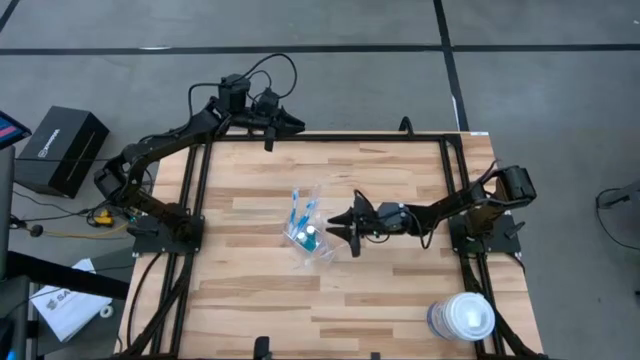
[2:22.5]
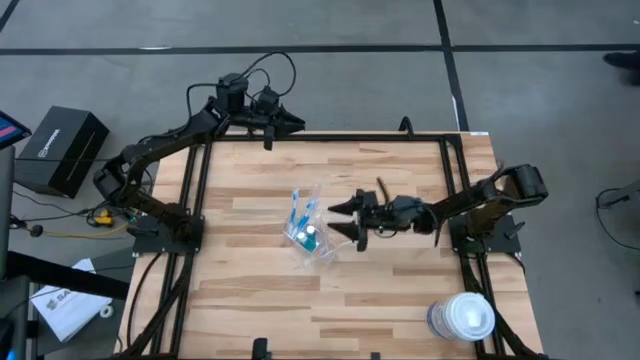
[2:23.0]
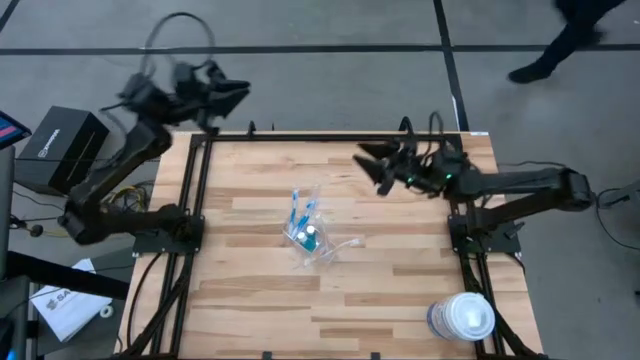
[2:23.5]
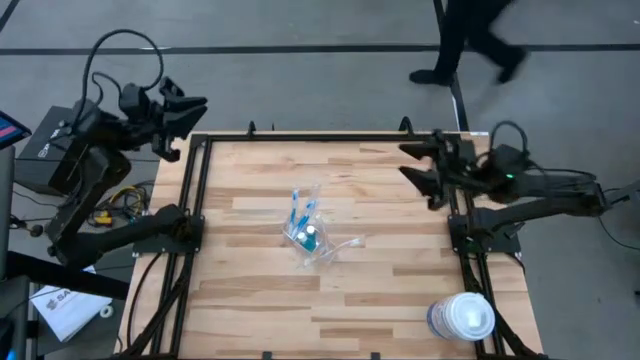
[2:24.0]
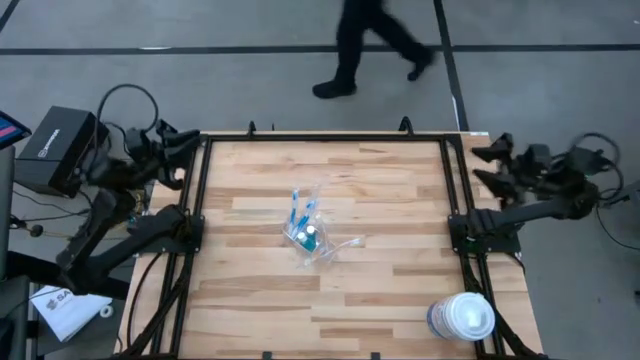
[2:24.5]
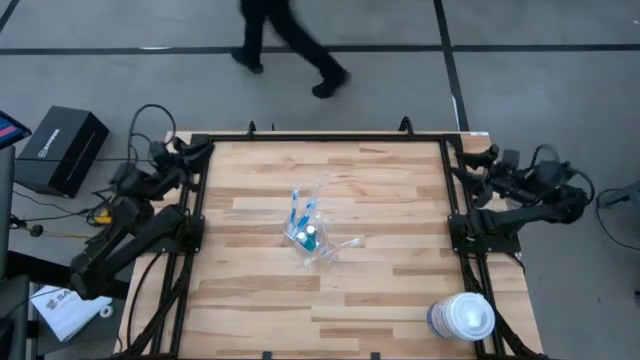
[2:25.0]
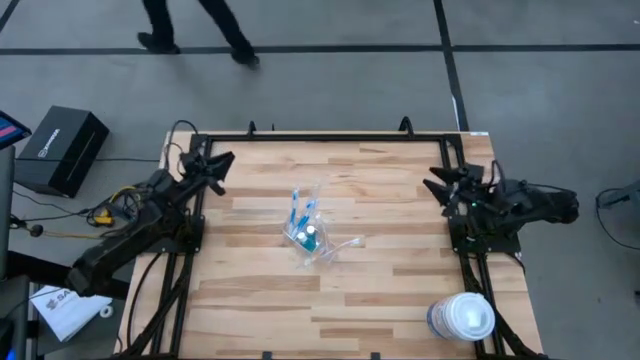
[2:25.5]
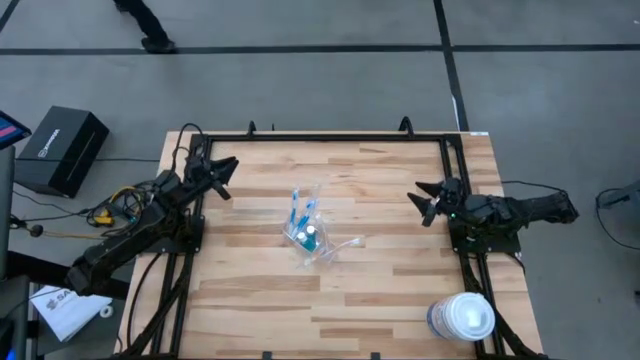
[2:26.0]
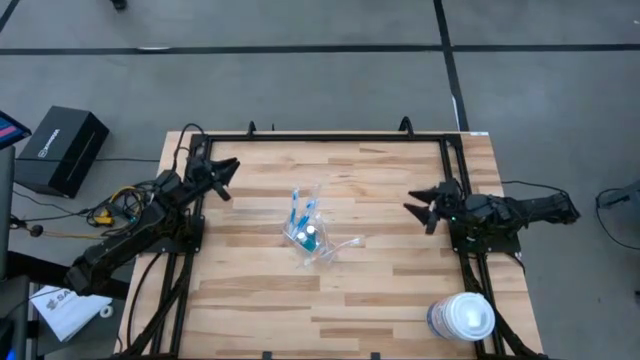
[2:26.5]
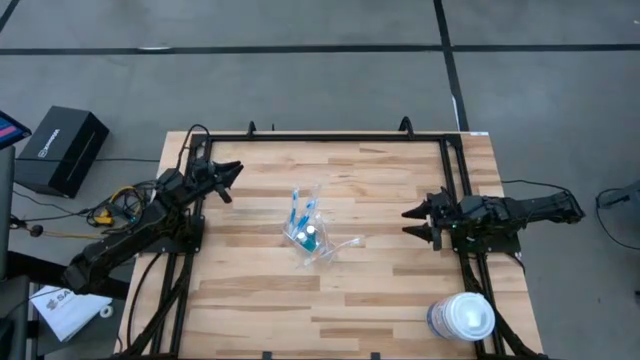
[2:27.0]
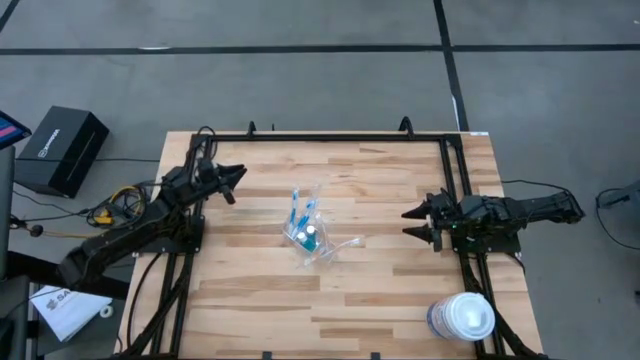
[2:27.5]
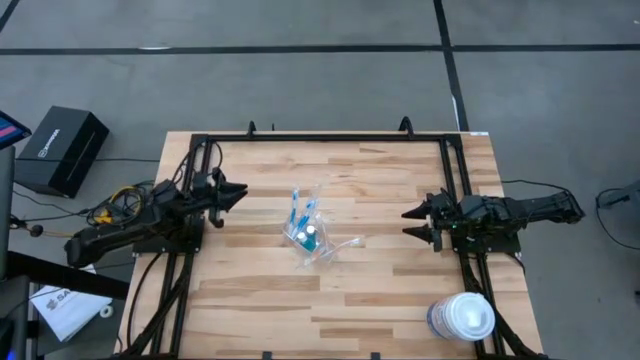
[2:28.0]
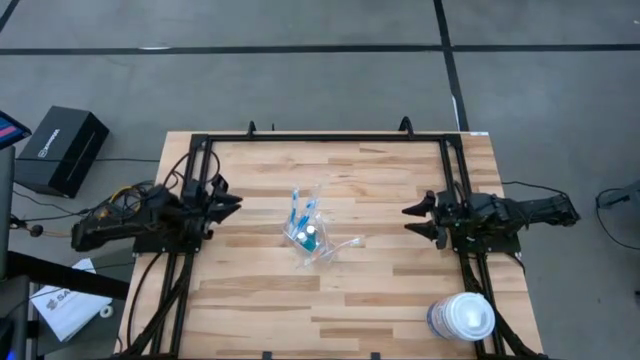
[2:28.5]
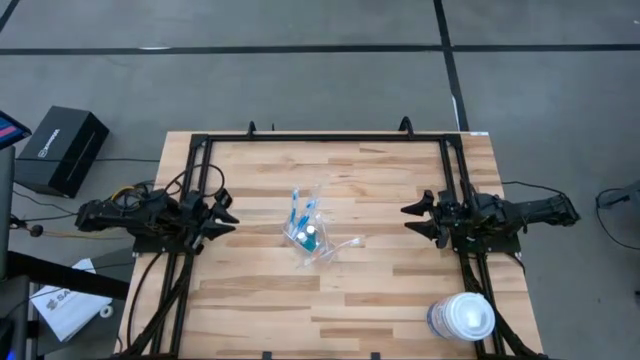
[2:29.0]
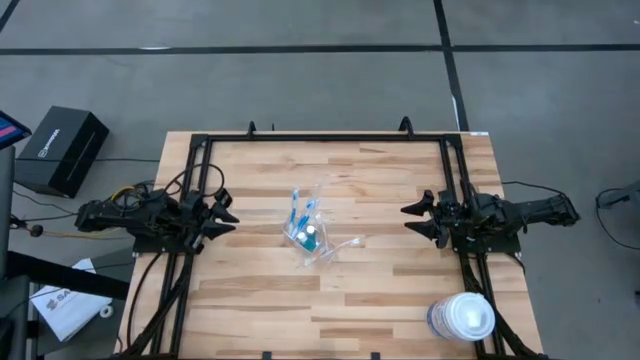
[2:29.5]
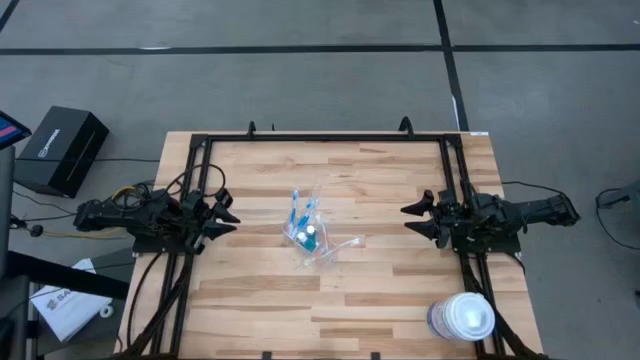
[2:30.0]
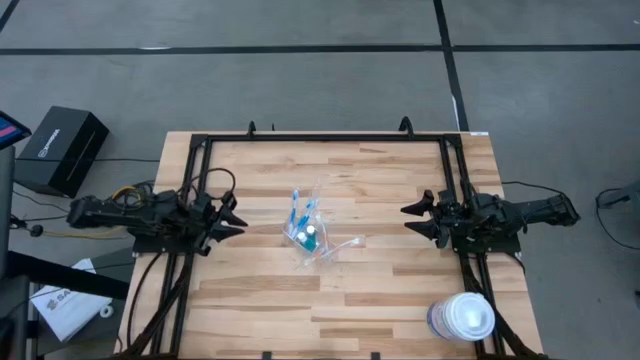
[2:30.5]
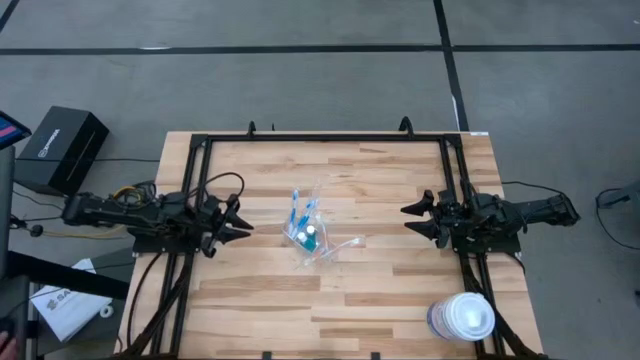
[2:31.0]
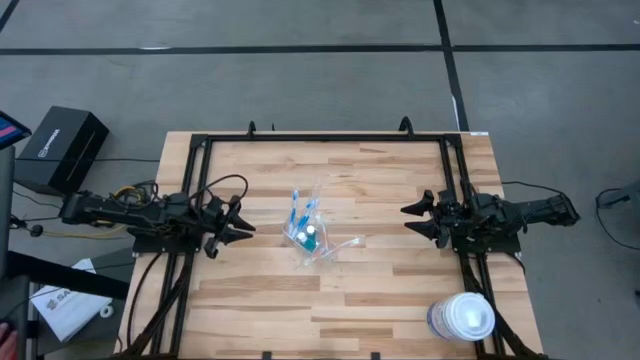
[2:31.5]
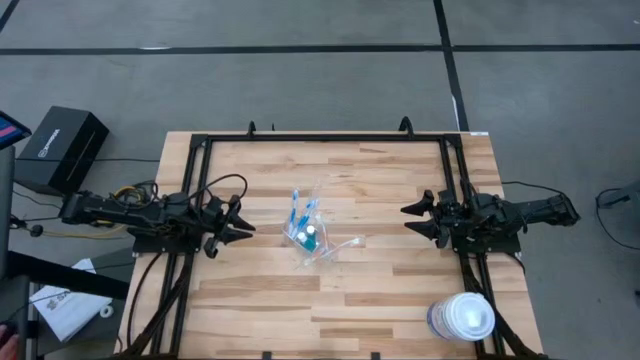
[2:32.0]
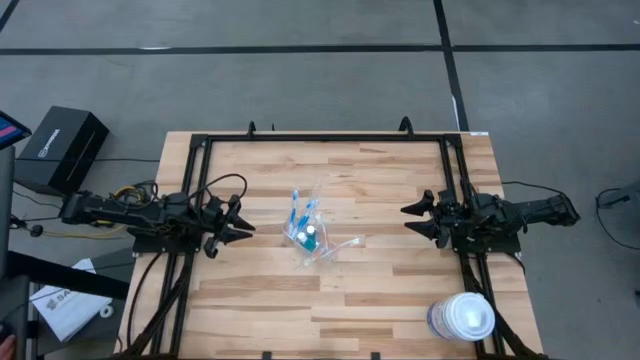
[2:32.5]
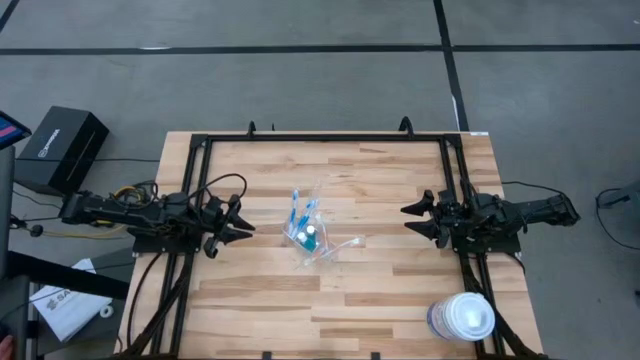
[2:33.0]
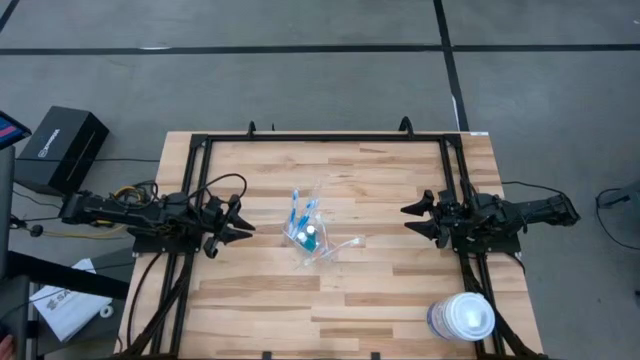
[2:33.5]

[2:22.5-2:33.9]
Task: Pick & Place toothbrushing station
Return to Home Position

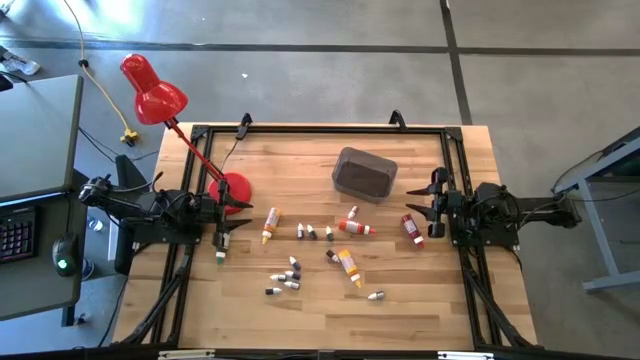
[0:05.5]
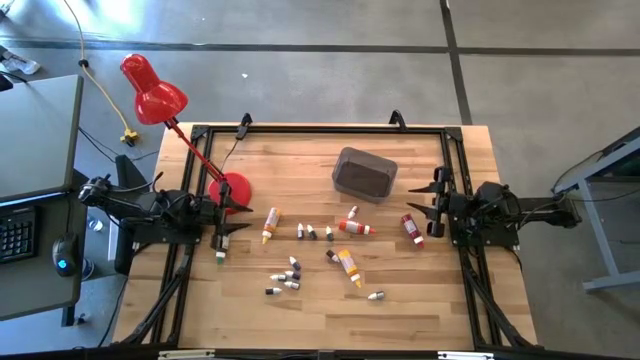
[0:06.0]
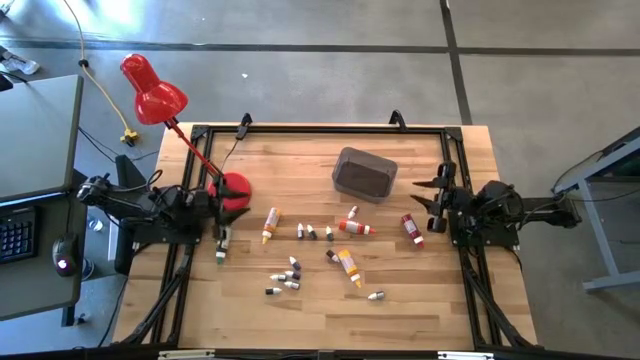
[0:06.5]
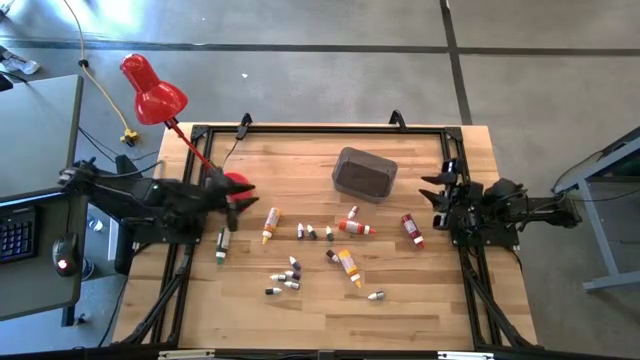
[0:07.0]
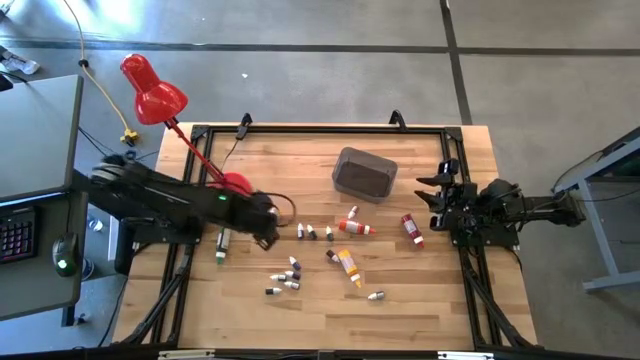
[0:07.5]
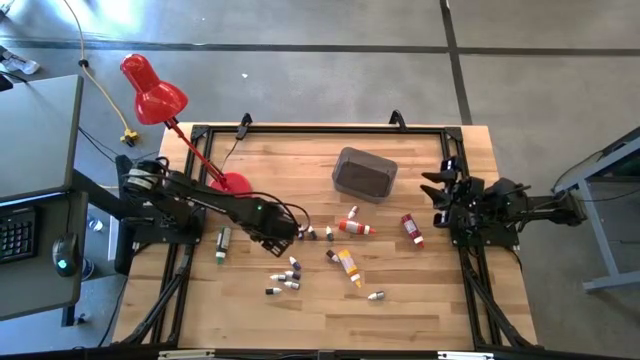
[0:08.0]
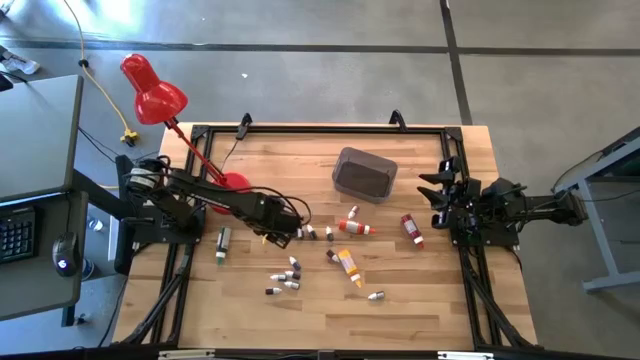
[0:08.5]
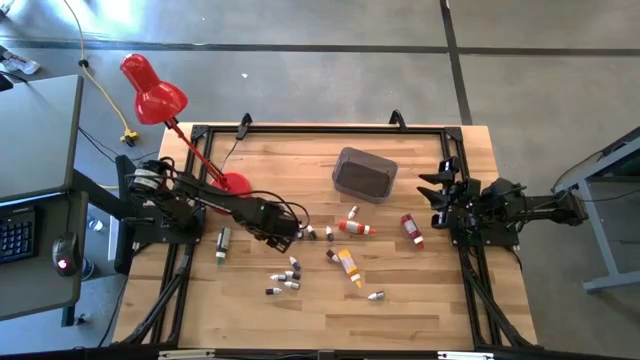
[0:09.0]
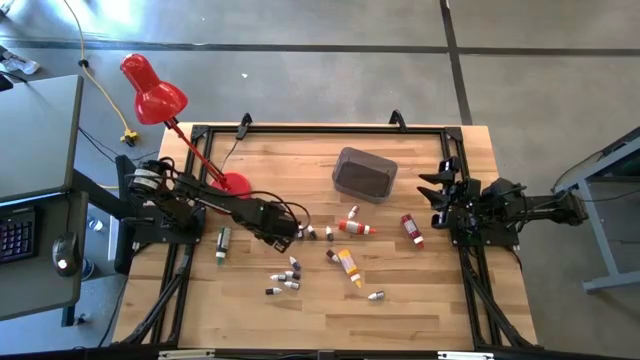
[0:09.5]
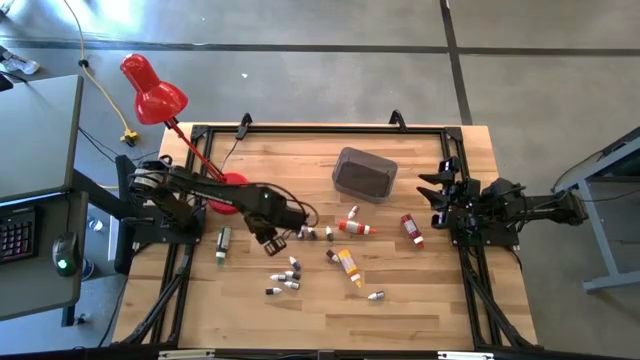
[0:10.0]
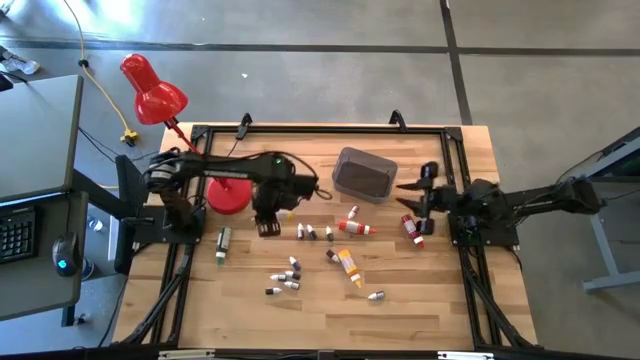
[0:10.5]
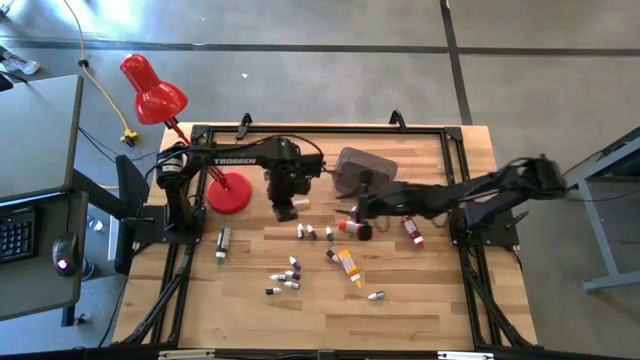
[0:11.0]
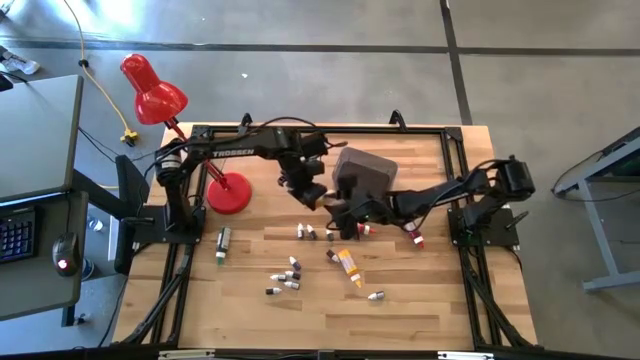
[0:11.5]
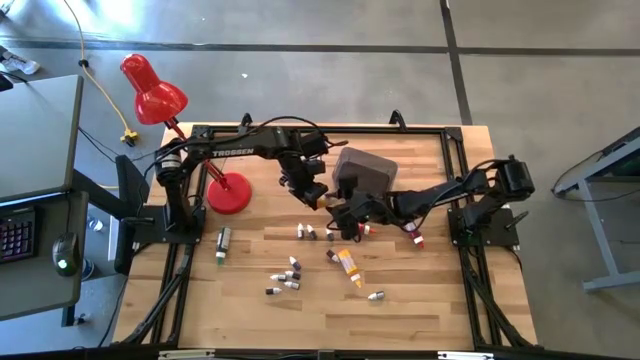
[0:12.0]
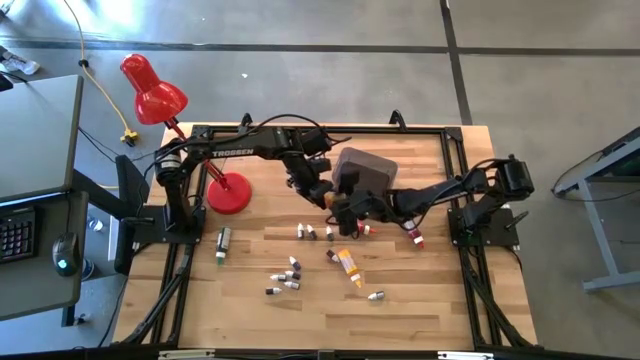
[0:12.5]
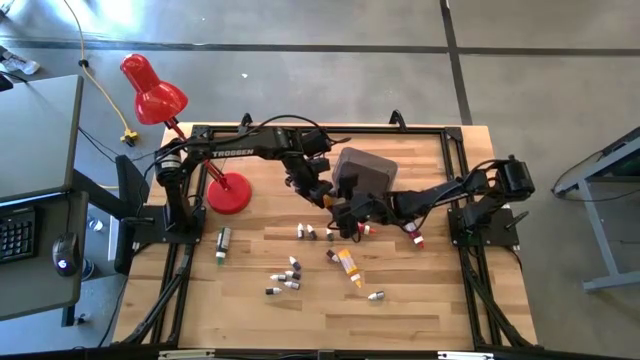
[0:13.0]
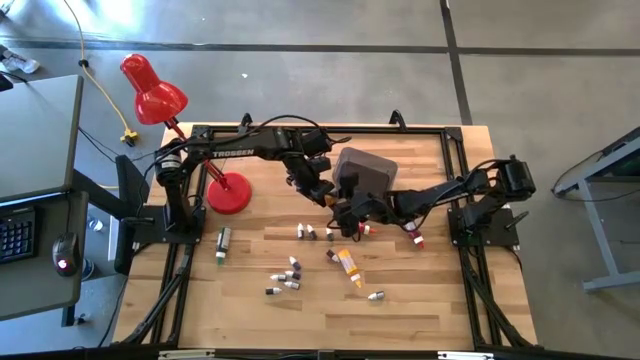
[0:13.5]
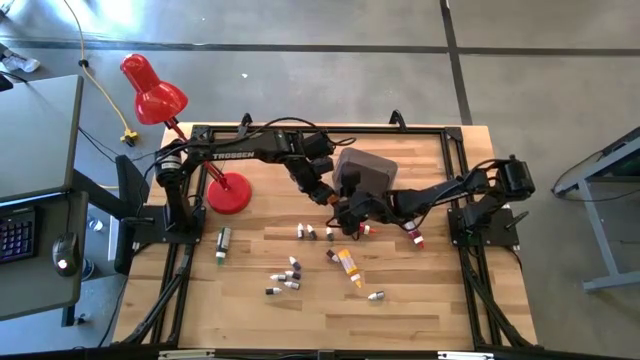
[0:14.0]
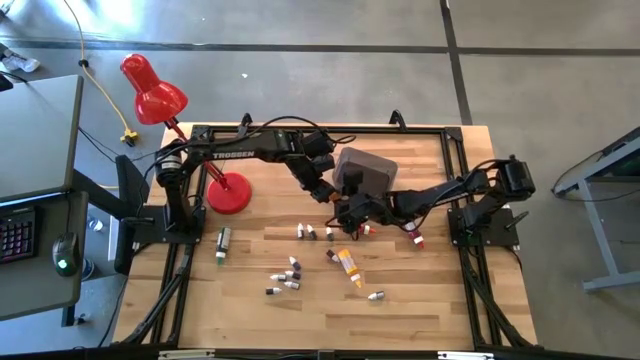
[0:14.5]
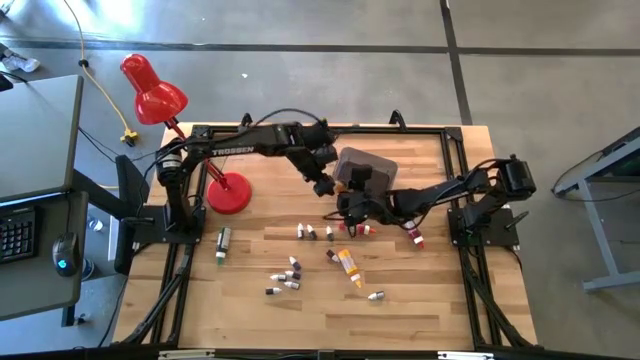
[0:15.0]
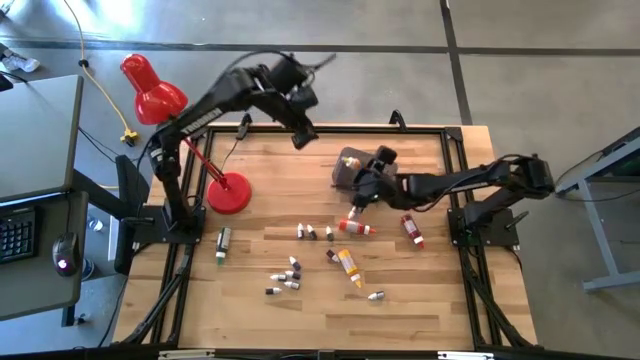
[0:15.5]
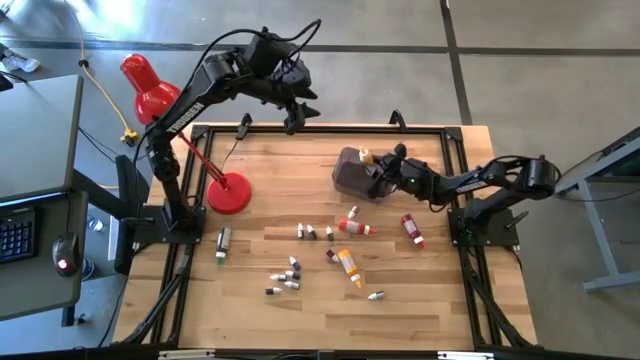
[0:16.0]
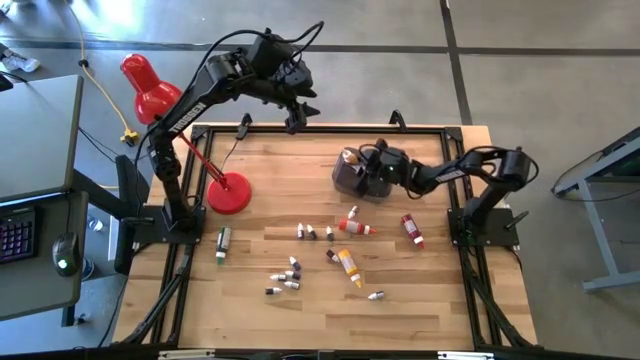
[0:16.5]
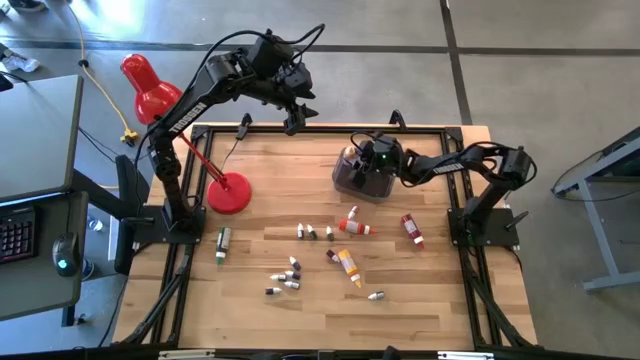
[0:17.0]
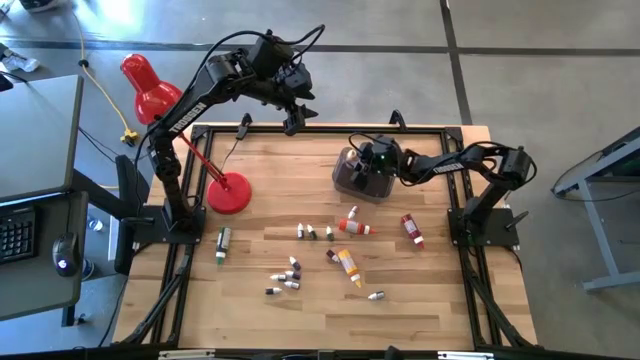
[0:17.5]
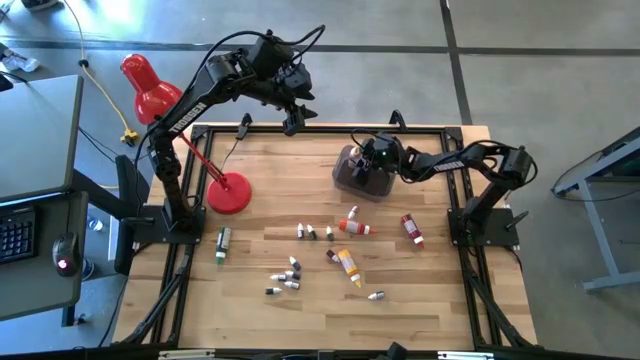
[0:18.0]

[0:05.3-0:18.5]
Task: Pick & Place food coloring
Put the left large yellow food coloring bottle into the bin
